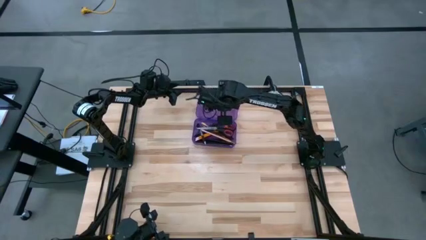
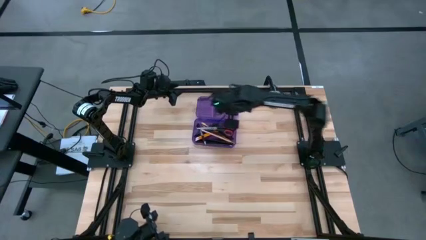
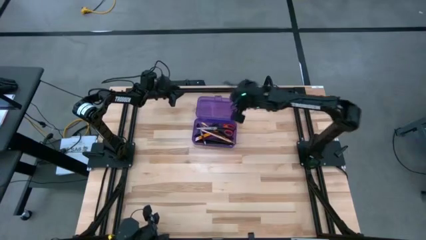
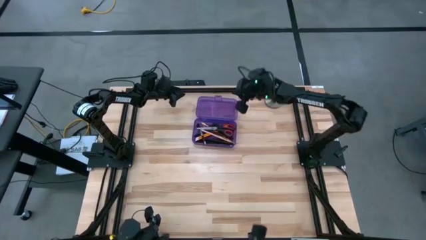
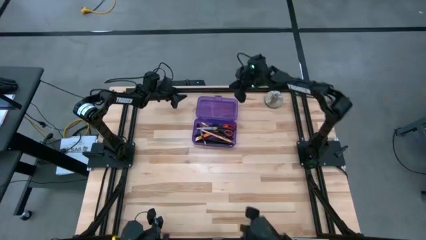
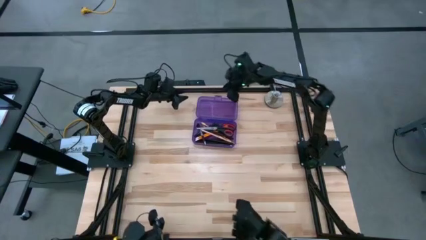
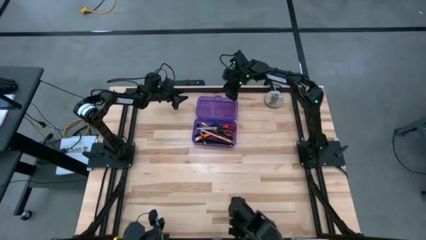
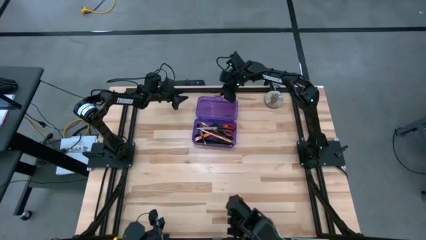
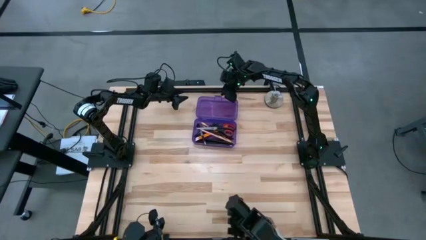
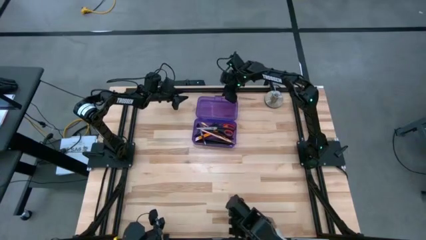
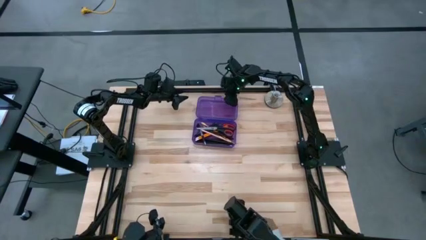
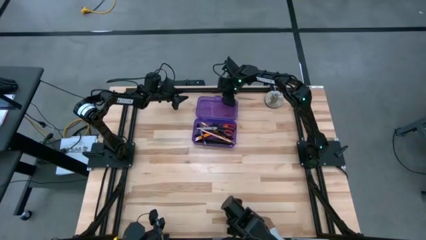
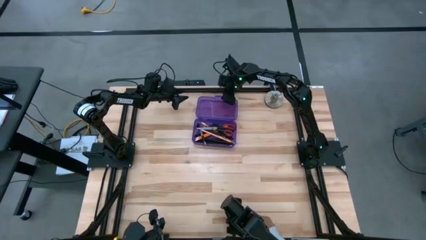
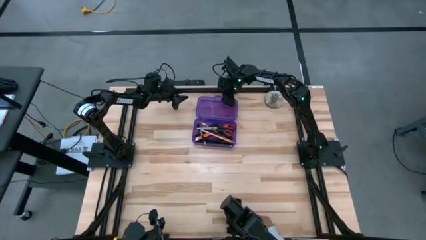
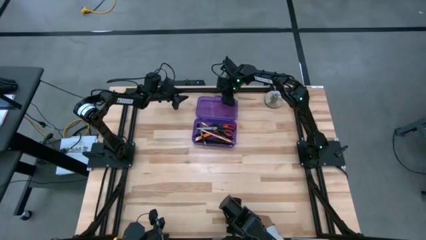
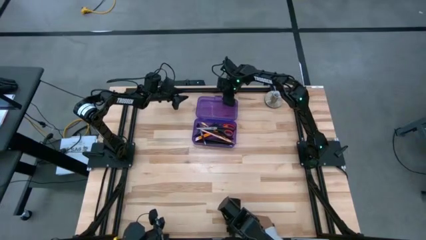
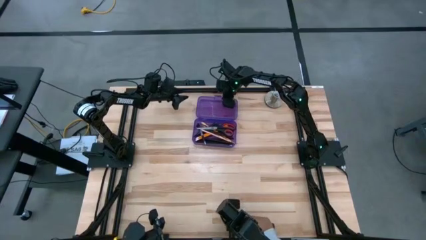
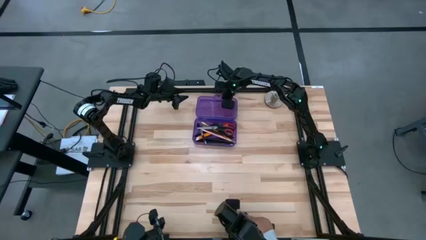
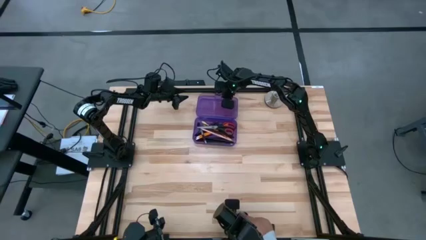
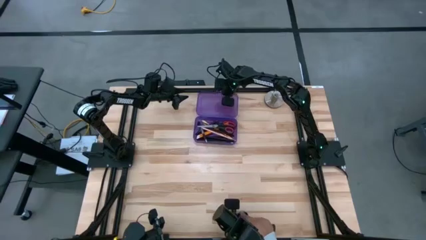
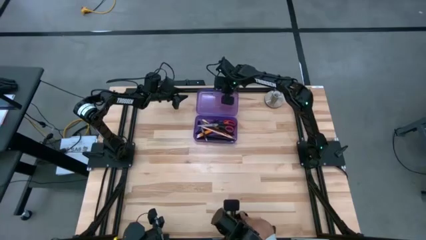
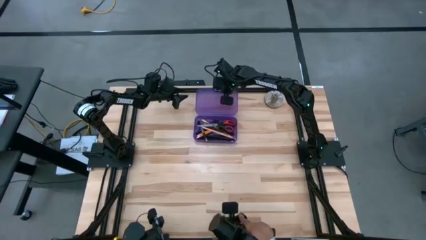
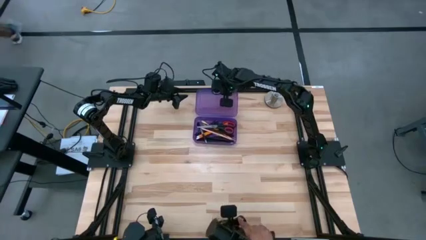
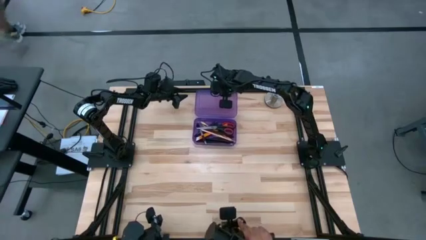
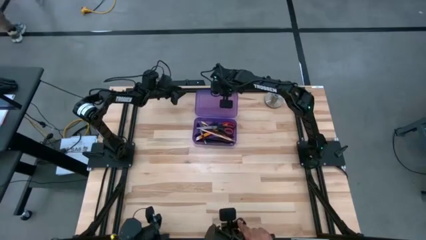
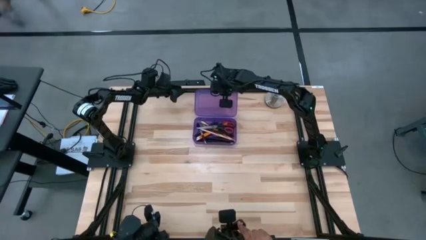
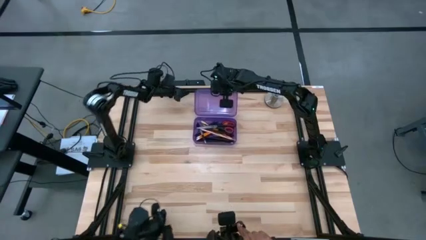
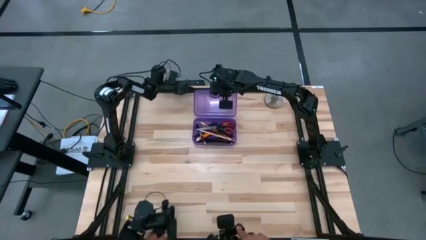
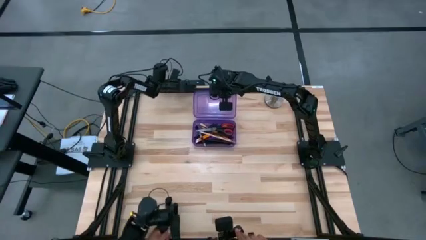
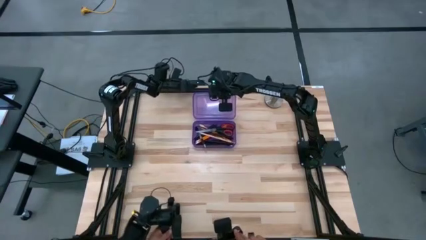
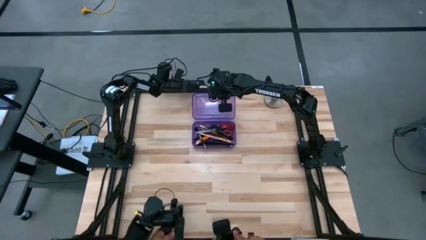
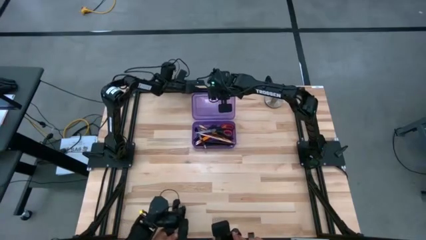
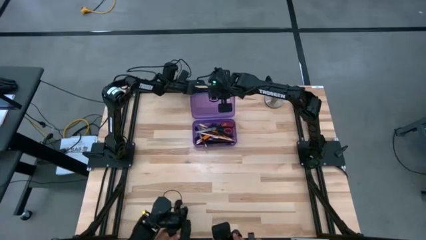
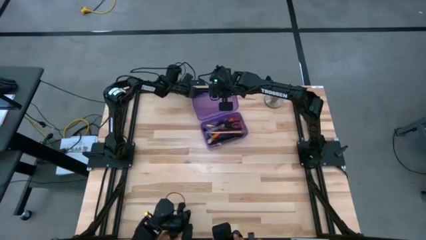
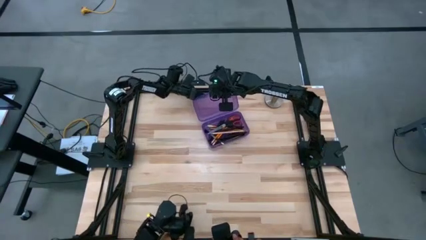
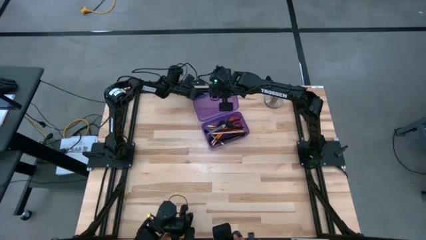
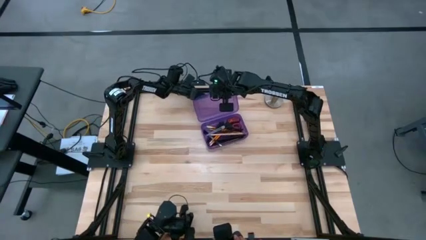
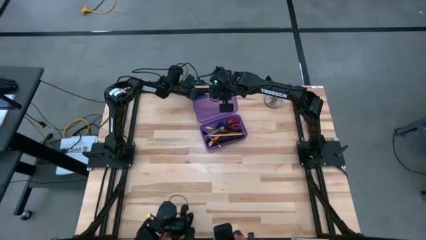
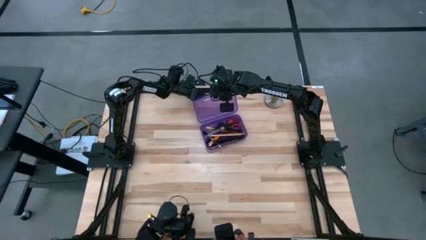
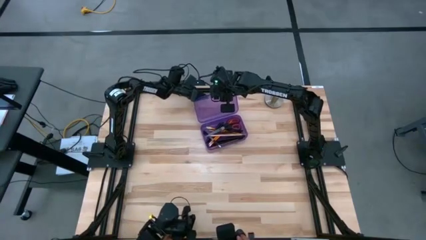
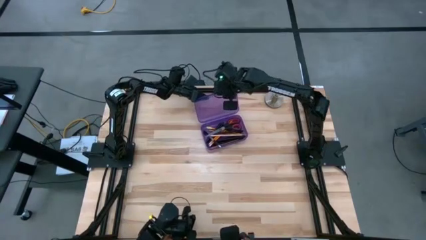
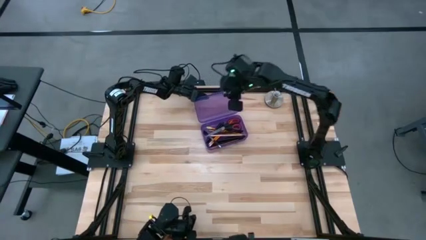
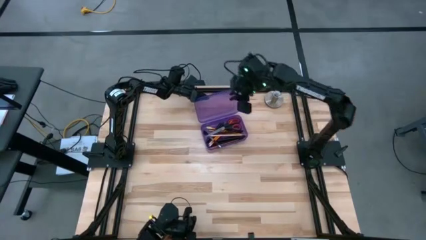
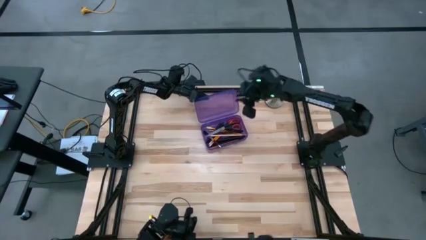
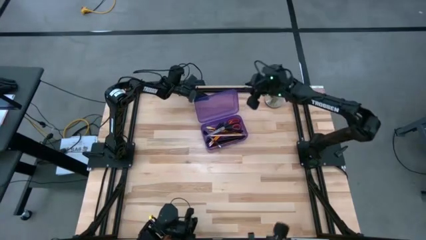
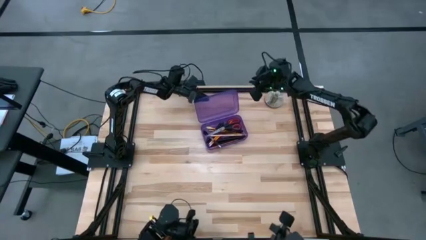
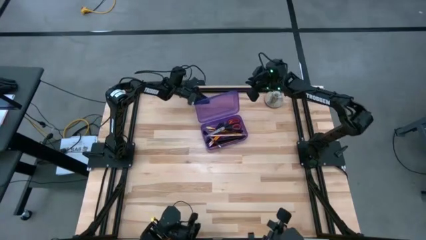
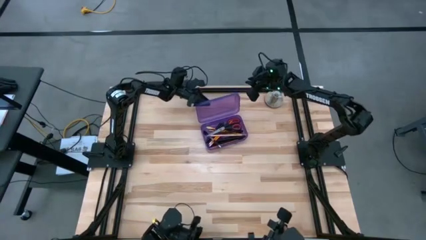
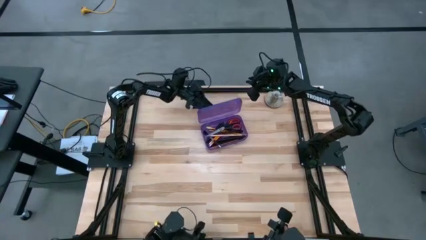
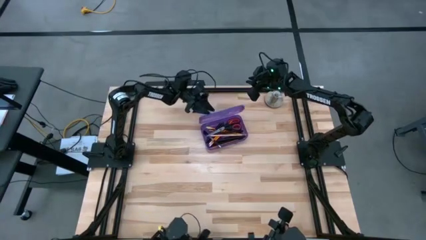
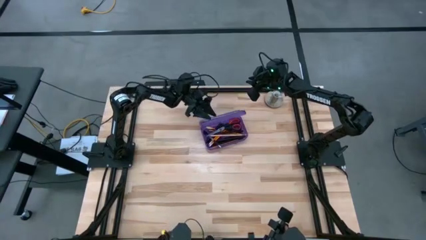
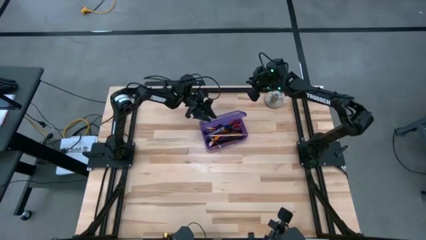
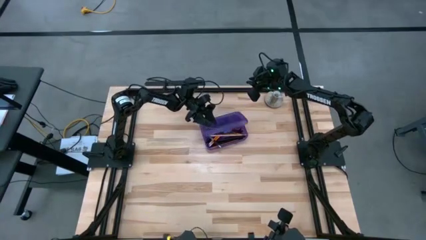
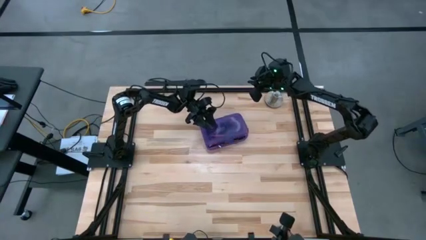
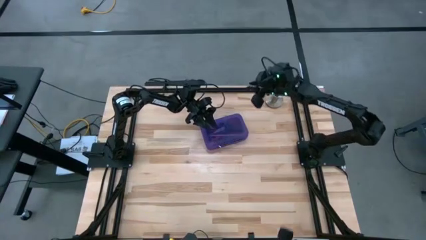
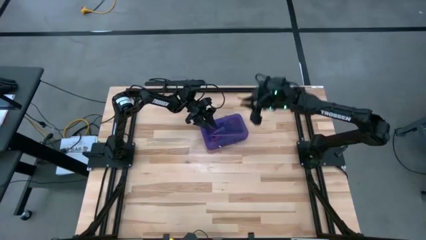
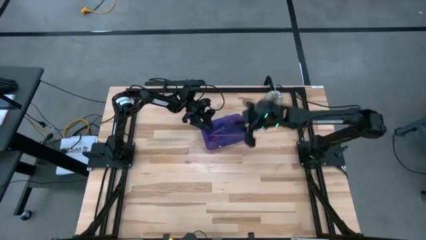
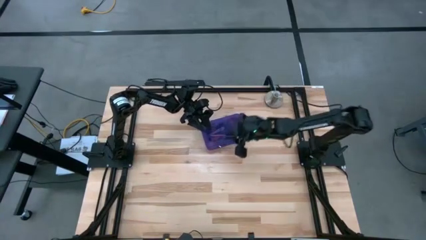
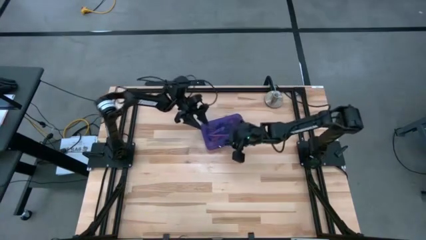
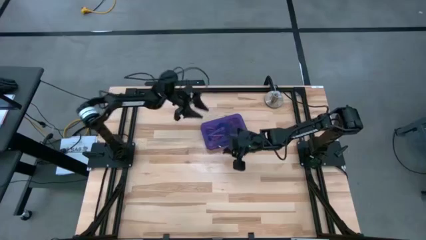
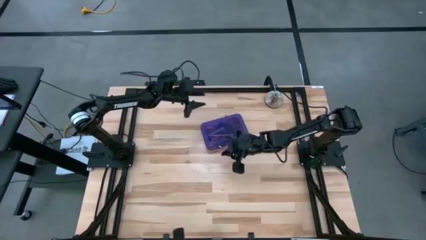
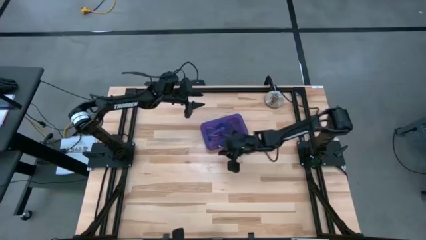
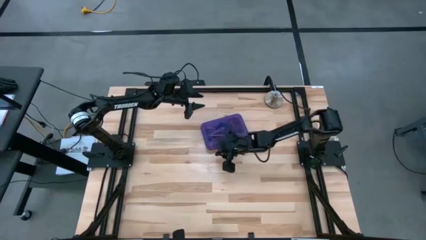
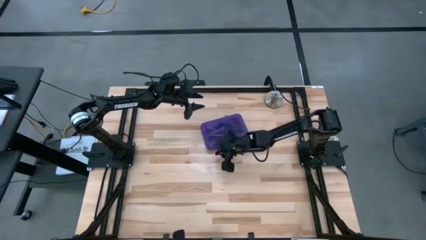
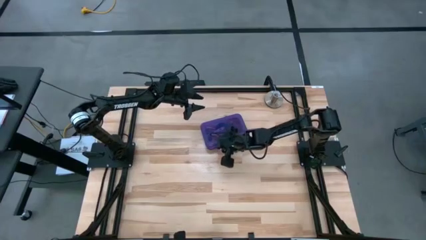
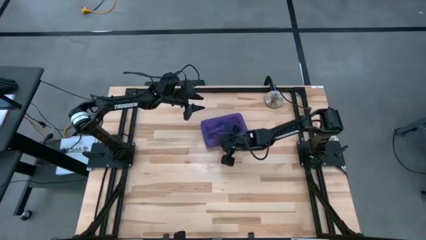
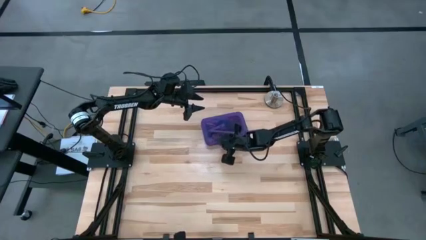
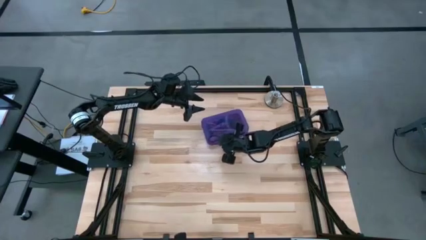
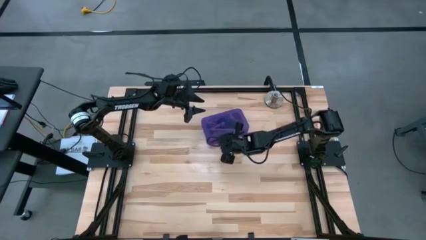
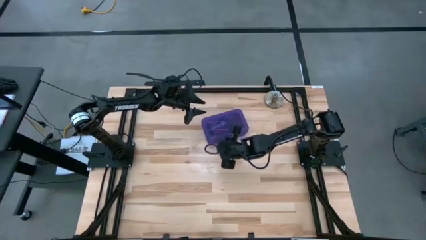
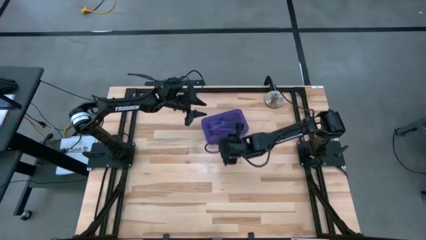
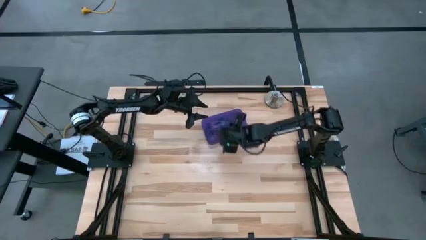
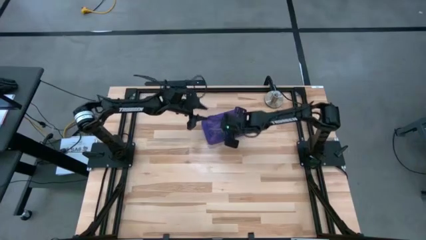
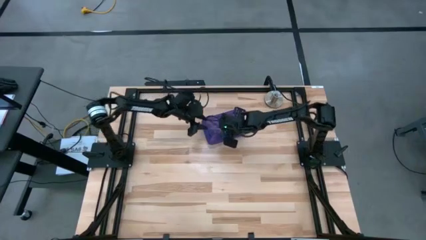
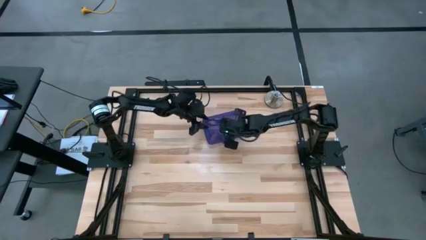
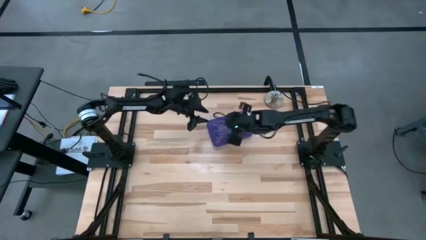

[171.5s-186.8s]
Task: Pick & place school supplies into a supply box
Close the purple supply box
